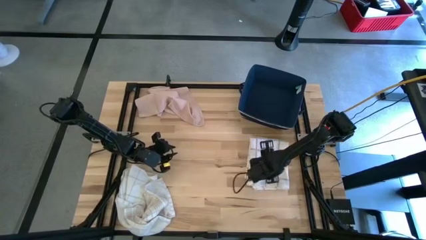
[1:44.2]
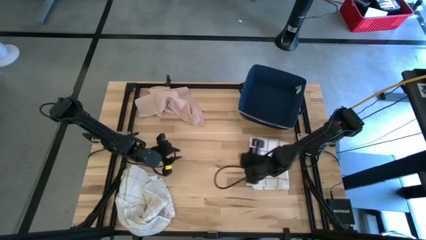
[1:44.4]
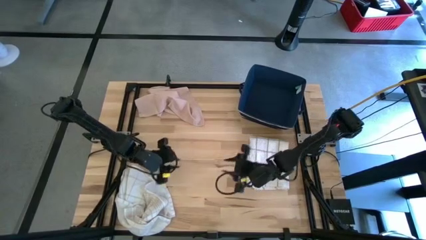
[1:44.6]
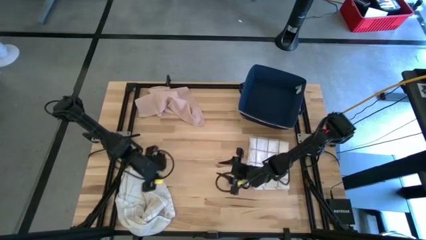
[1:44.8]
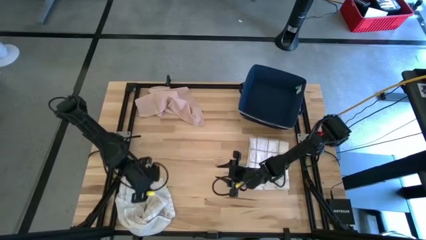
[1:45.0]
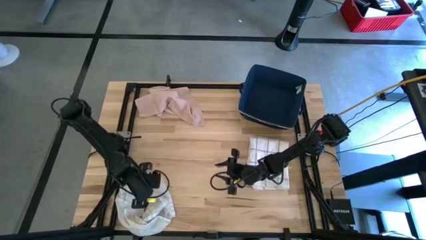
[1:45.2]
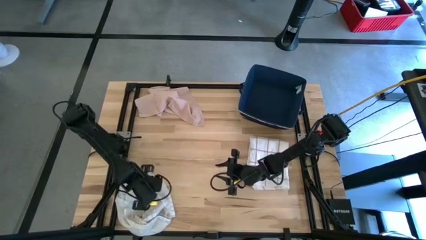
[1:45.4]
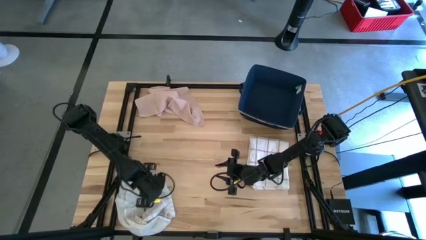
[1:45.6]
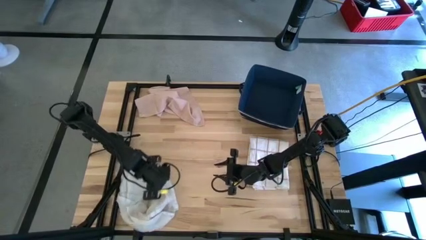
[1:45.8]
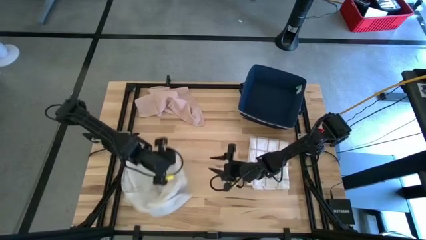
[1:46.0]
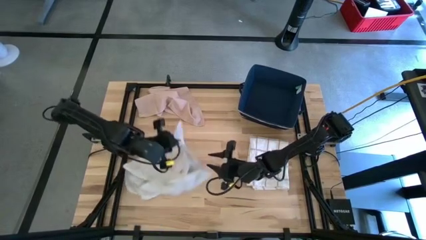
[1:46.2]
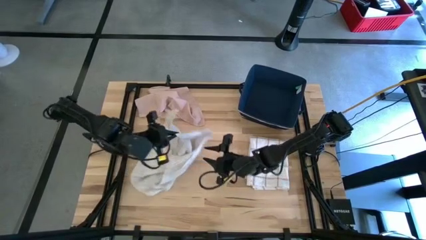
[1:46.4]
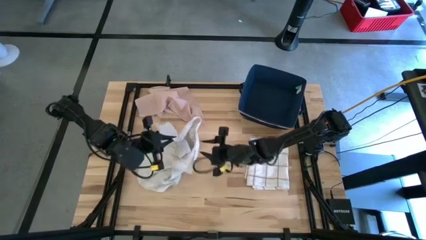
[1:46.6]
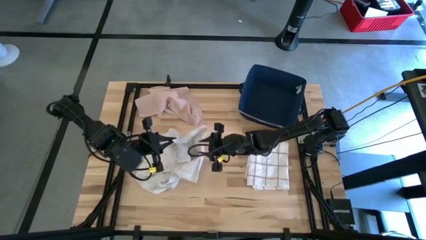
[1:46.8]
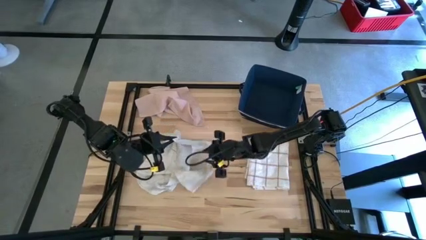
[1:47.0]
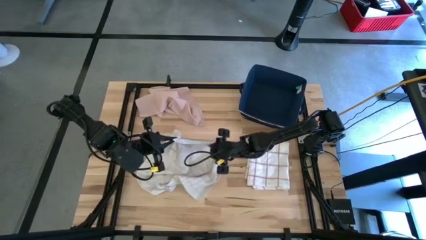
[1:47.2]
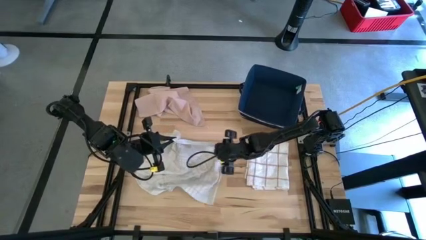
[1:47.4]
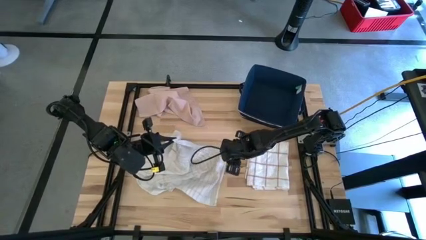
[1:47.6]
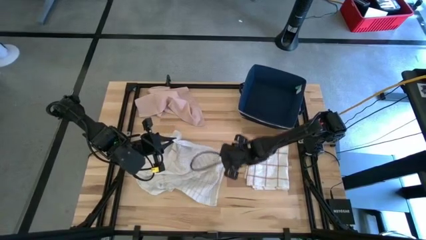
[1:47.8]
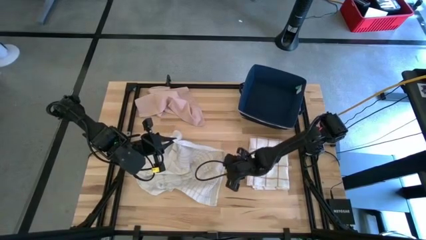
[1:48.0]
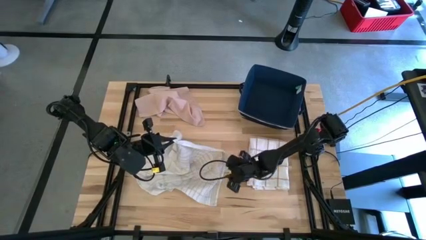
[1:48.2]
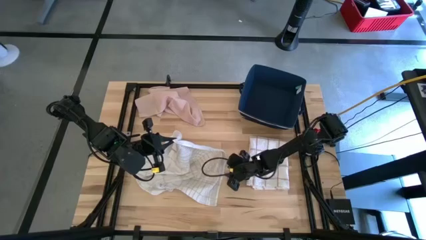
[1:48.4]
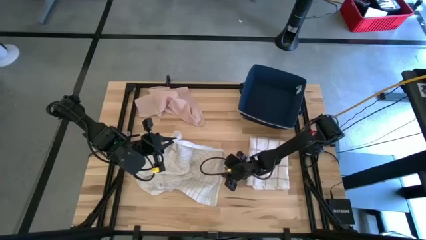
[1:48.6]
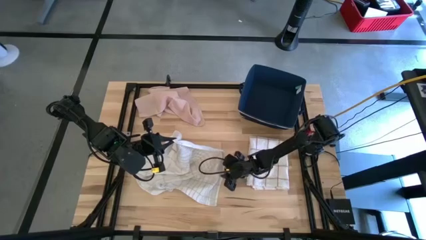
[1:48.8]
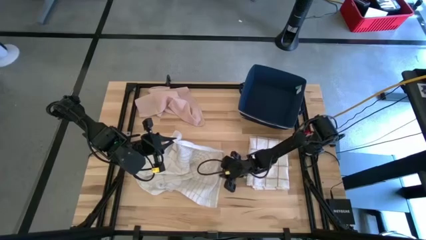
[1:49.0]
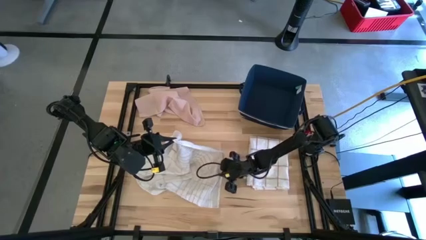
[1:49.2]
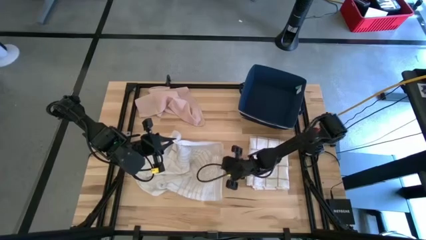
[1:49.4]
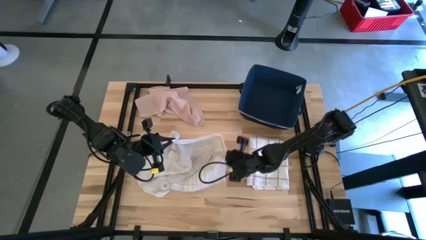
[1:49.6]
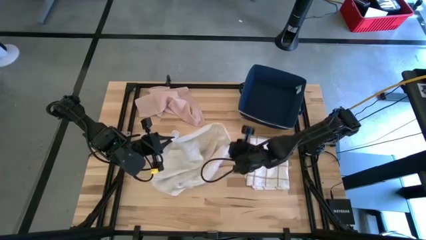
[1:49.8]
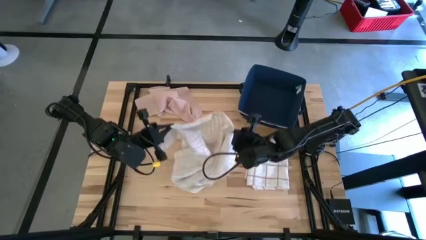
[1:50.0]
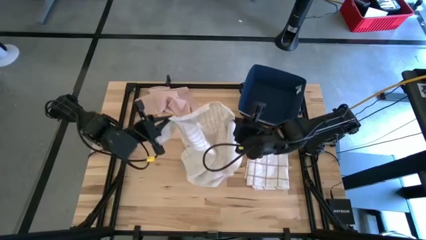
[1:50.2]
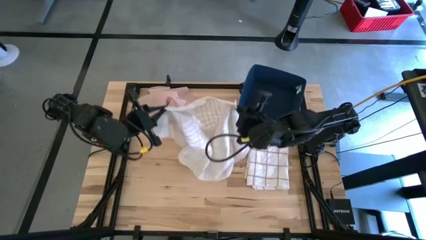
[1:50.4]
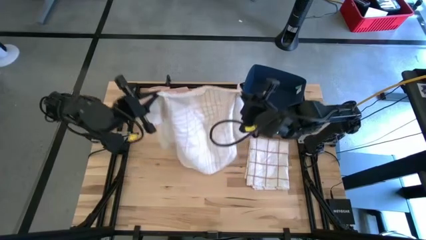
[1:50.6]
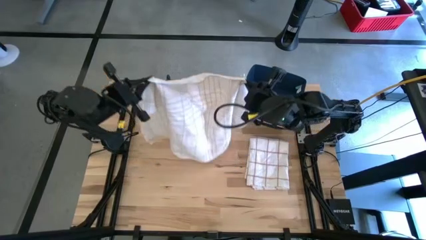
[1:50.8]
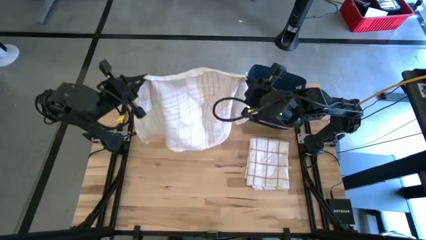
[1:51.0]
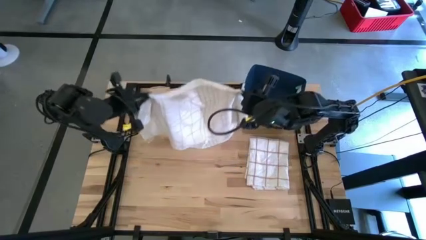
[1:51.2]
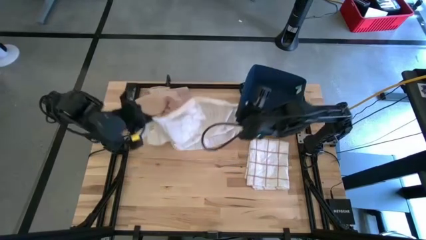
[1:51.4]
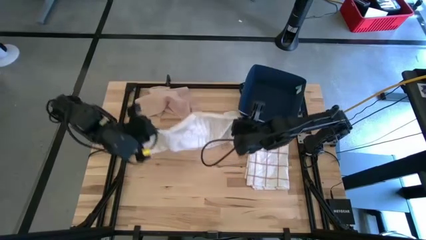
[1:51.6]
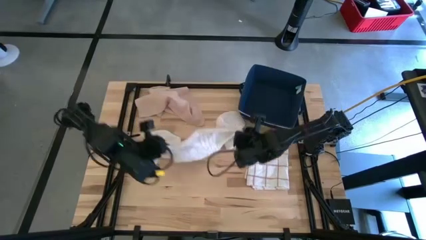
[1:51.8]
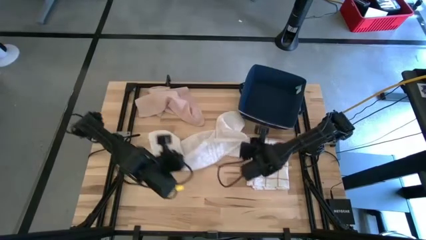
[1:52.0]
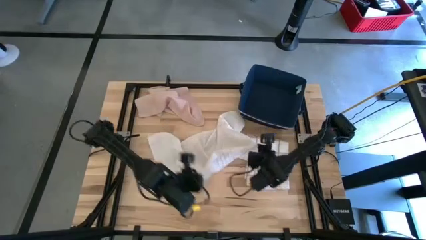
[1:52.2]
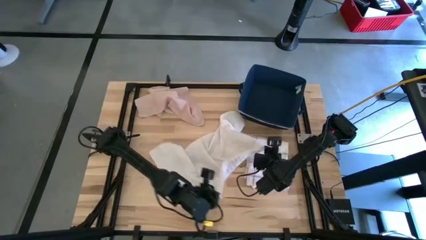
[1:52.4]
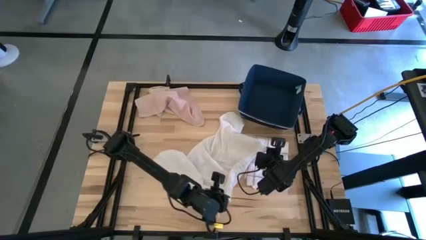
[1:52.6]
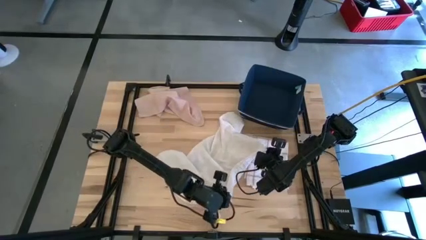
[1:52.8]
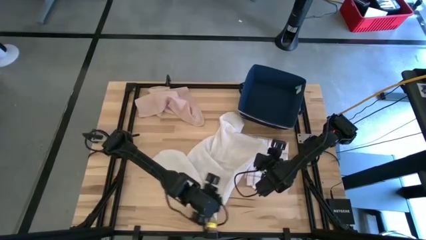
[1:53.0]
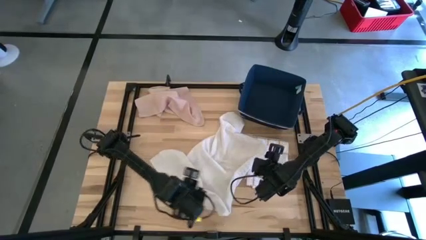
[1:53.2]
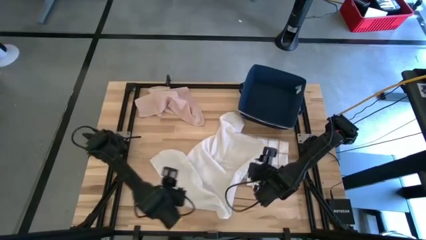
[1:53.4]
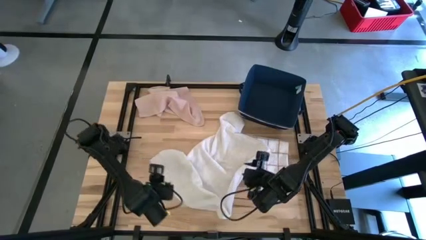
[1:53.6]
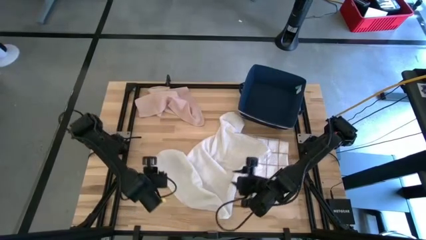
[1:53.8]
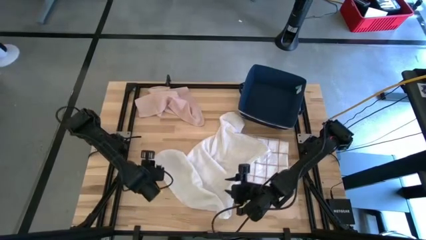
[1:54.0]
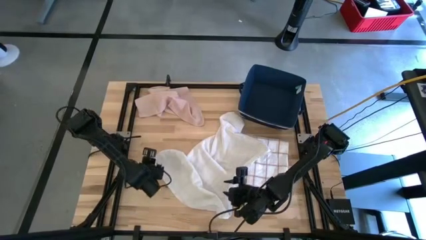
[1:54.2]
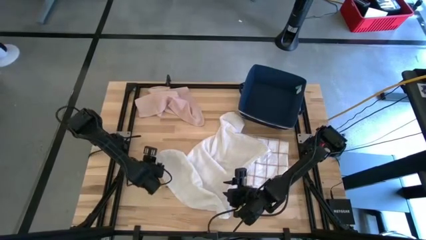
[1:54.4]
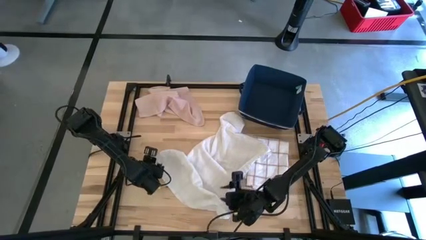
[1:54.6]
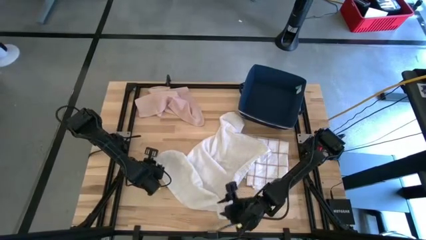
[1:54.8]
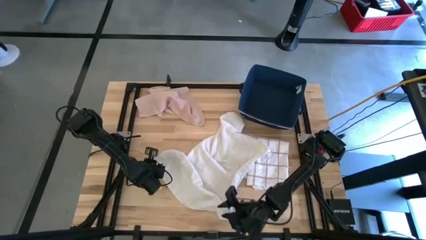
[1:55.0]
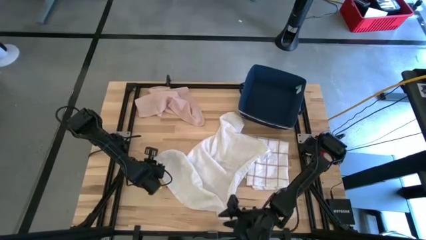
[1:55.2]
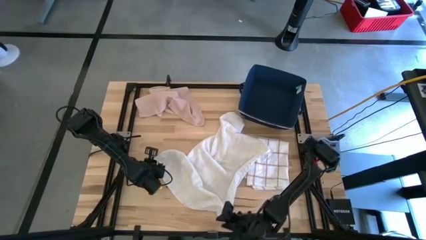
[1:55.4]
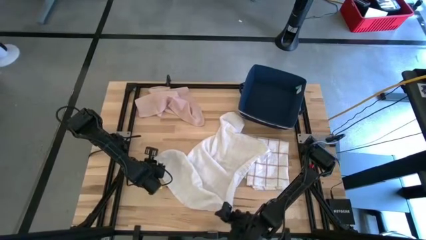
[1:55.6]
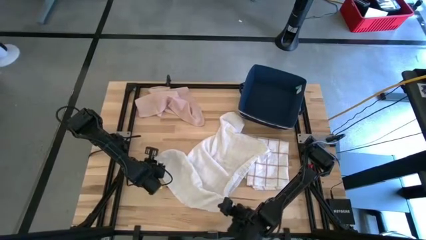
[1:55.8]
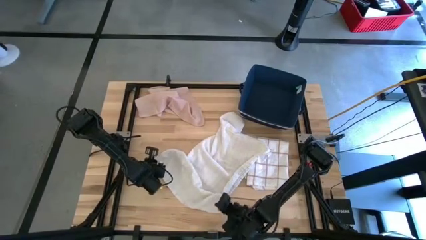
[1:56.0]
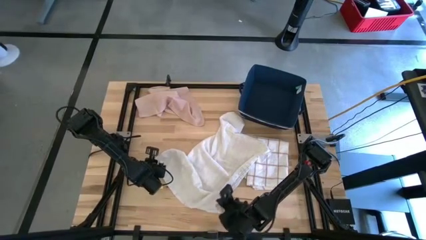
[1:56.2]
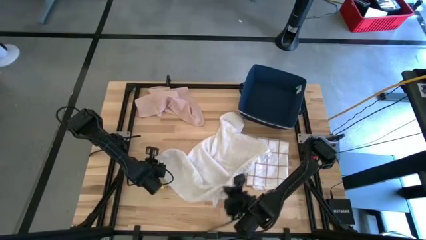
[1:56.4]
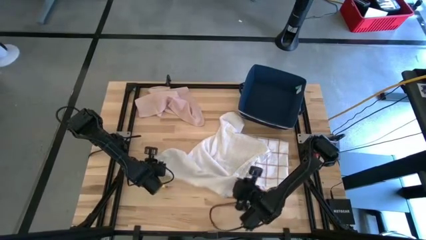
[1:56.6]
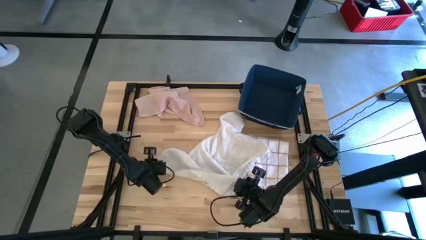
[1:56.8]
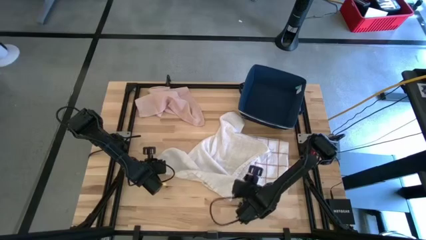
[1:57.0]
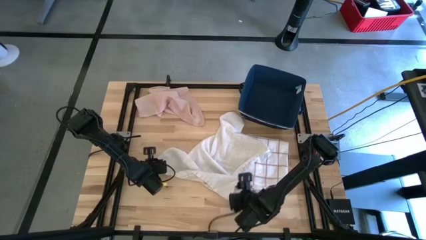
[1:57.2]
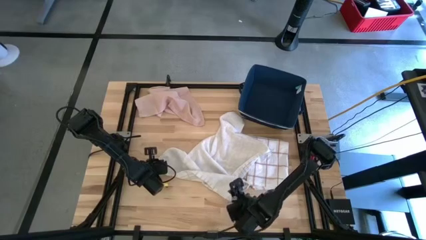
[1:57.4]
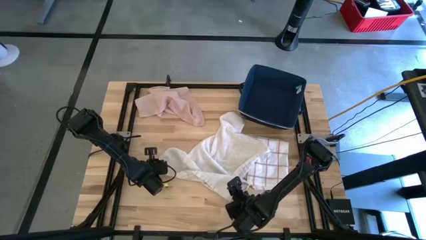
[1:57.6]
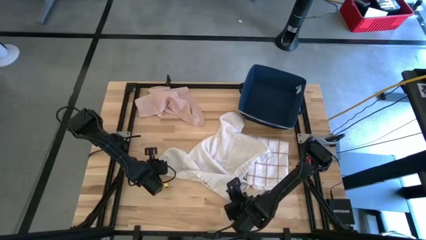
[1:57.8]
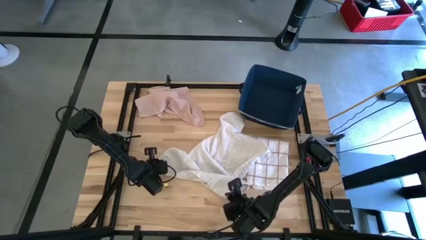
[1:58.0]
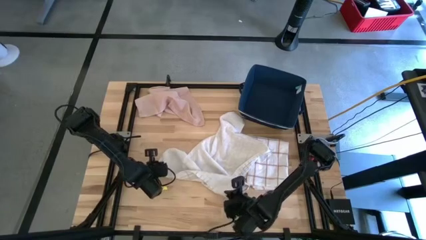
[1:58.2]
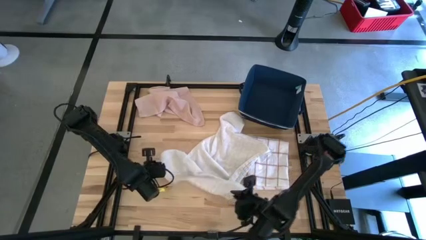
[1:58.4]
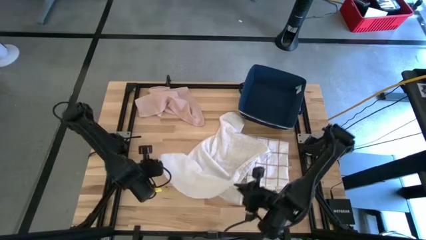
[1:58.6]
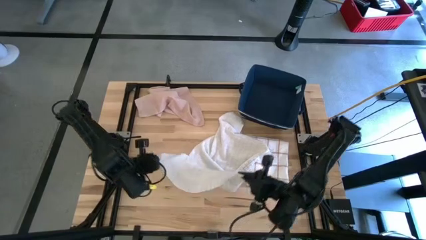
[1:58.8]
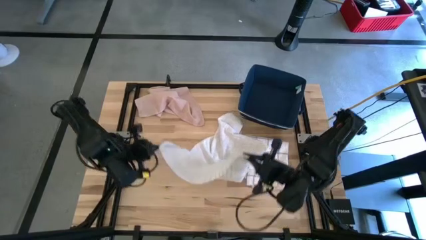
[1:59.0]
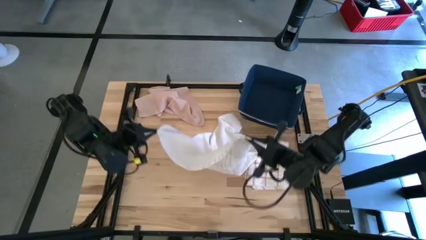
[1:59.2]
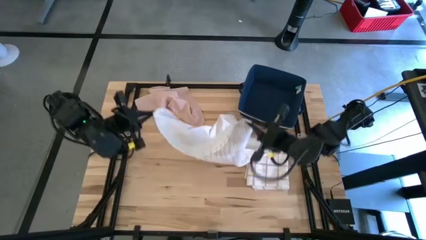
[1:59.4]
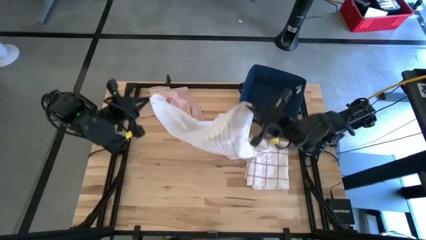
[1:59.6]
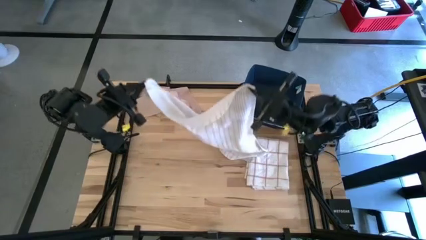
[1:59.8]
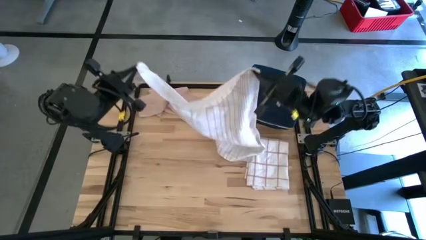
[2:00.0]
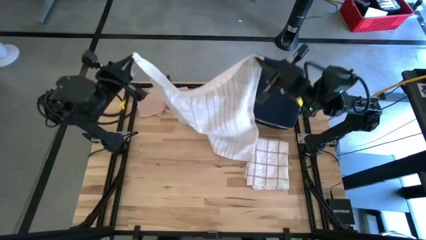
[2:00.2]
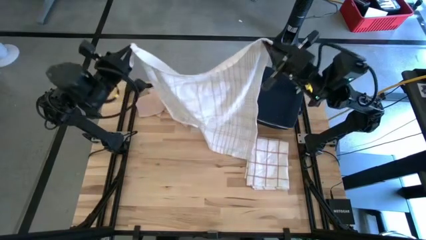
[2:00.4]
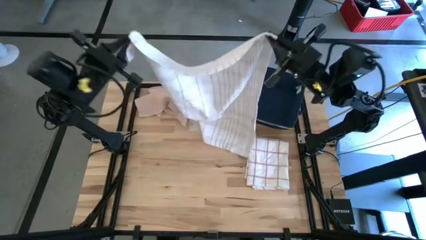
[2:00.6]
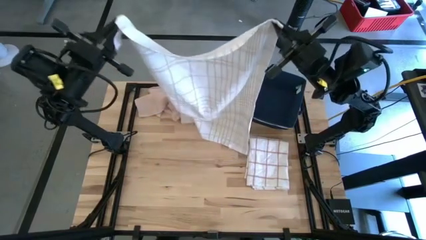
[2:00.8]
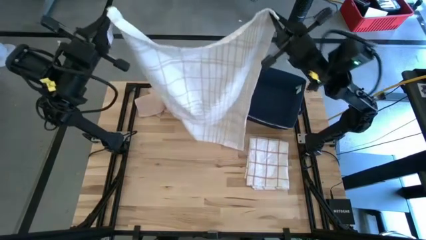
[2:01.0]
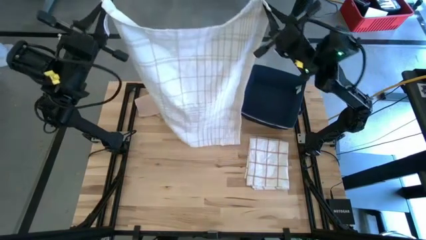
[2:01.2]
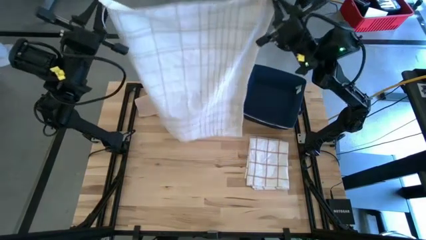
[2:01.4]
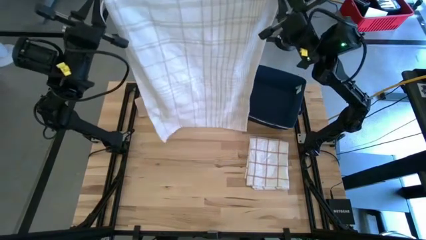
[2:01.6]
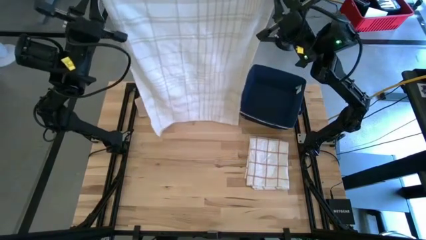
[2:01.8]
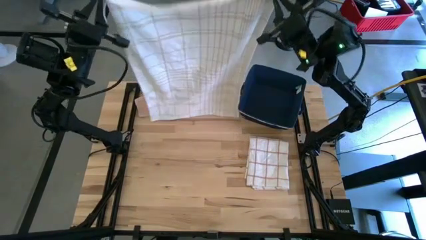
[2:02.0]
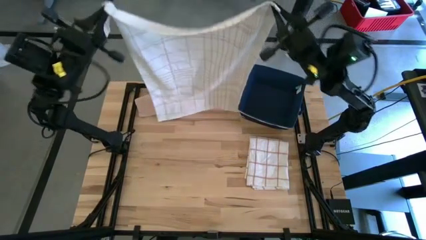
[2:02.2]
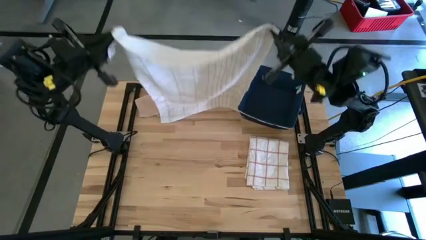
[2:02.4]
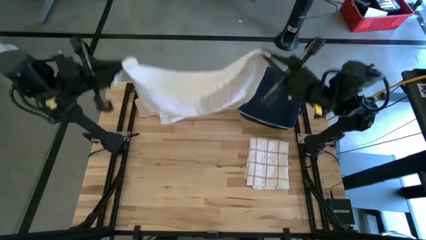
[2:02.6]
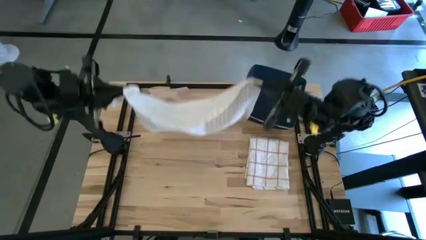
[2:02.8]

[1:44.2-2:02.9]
Task: Fold towel
Fold the white with grey-stripe towel
